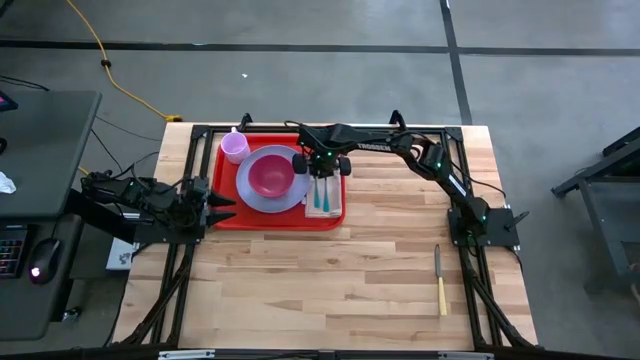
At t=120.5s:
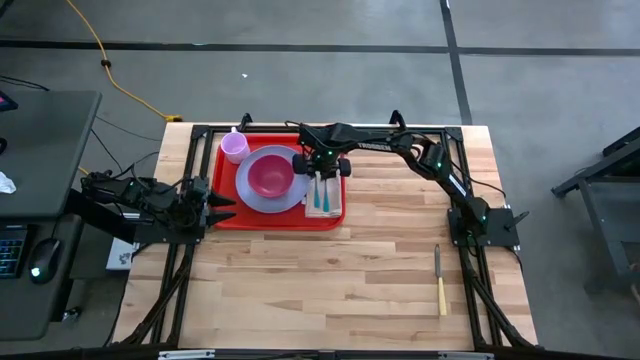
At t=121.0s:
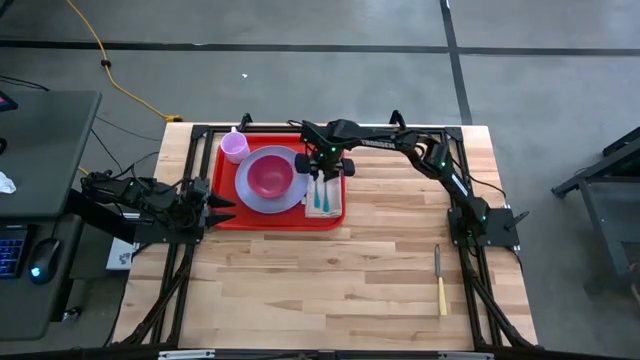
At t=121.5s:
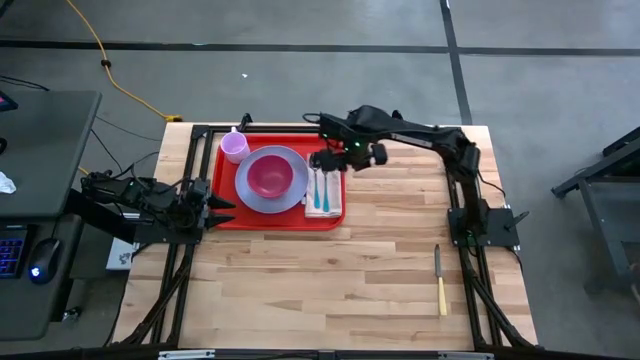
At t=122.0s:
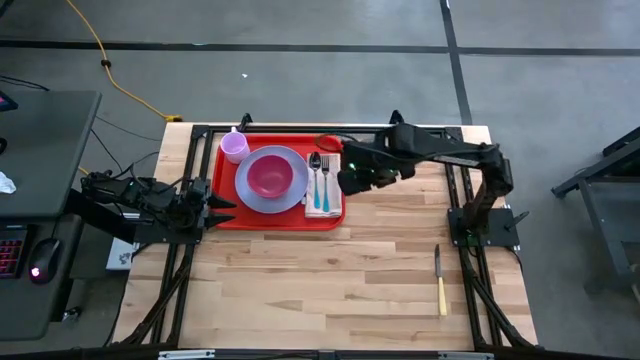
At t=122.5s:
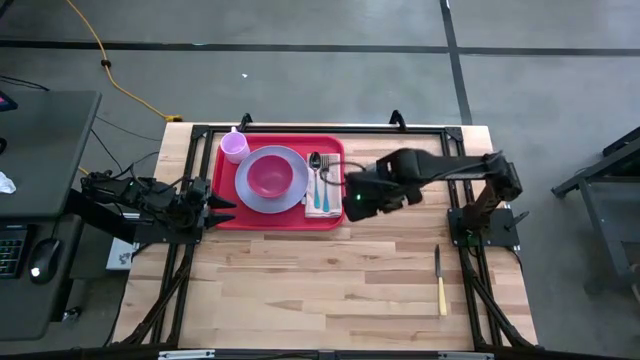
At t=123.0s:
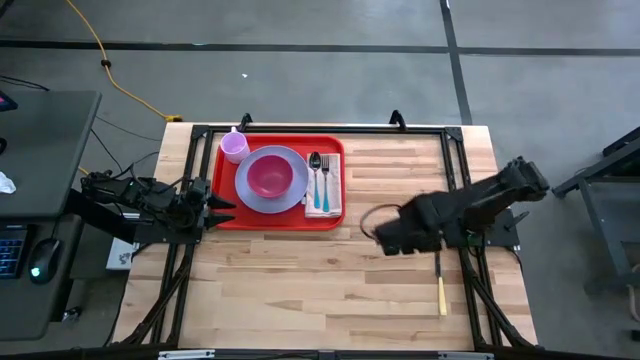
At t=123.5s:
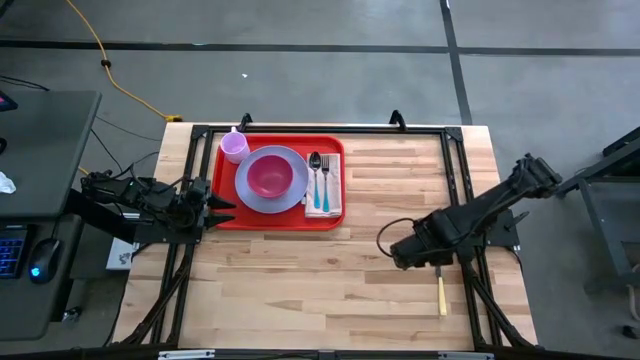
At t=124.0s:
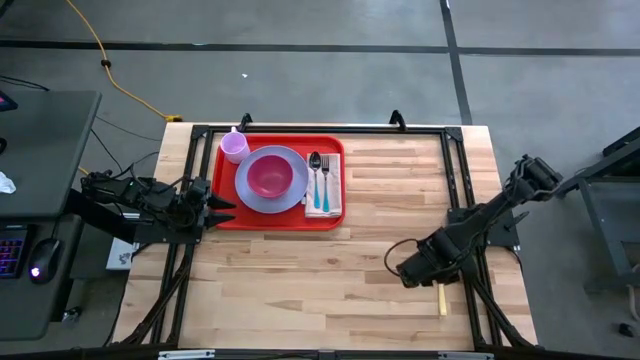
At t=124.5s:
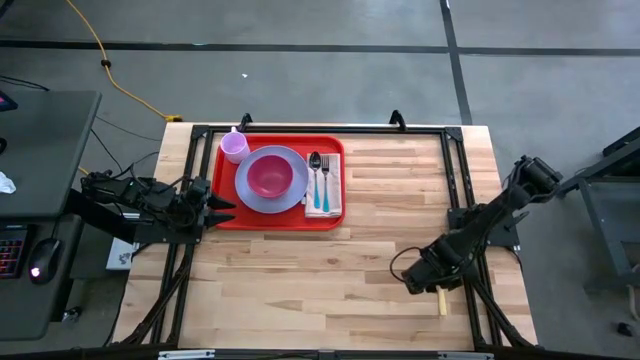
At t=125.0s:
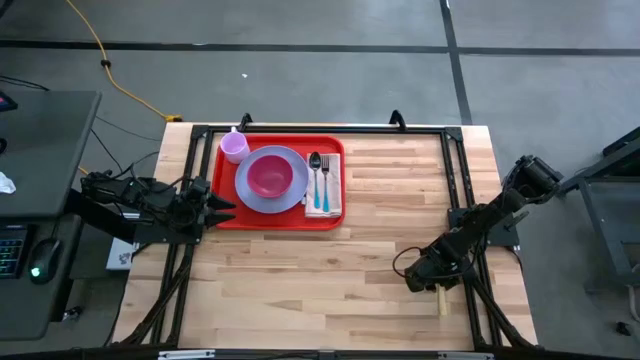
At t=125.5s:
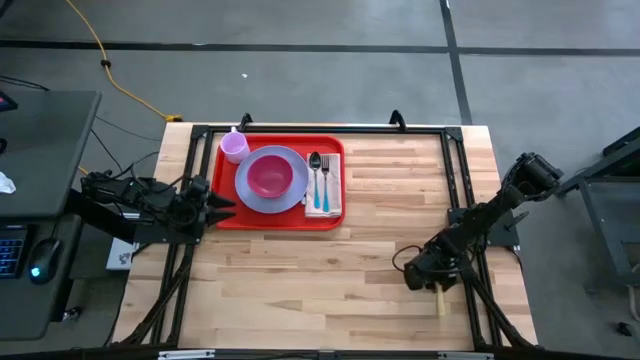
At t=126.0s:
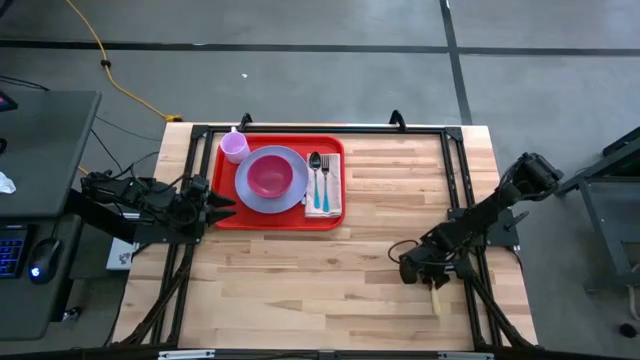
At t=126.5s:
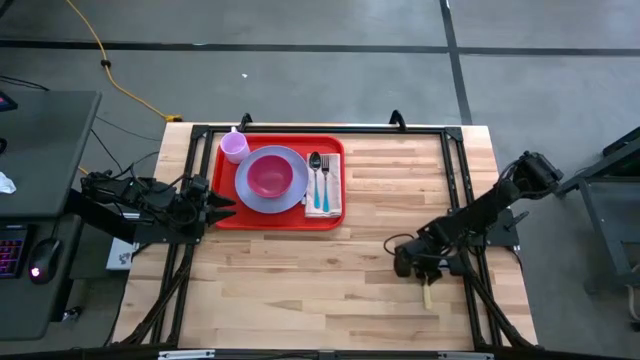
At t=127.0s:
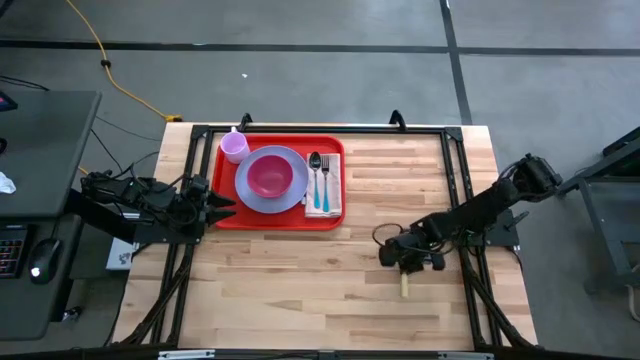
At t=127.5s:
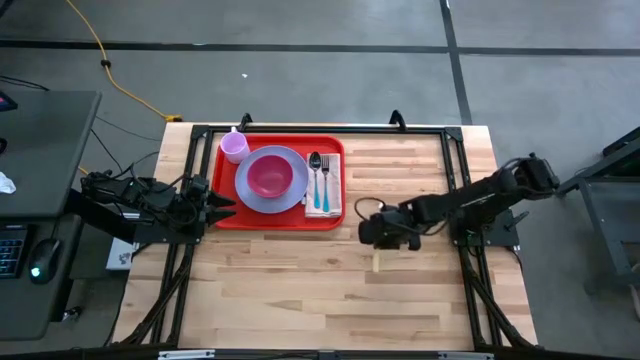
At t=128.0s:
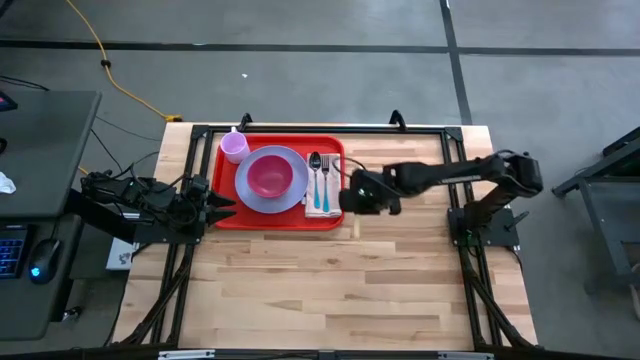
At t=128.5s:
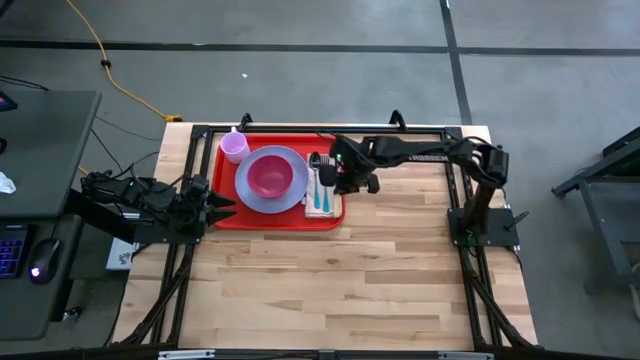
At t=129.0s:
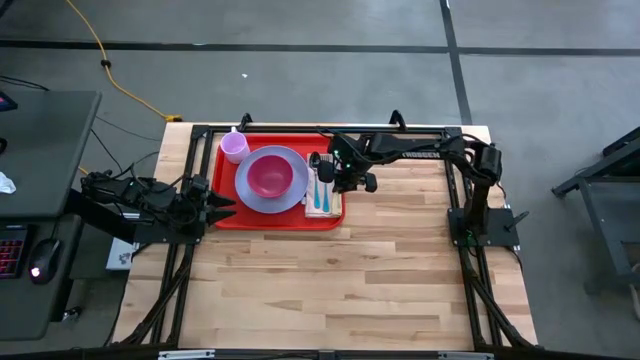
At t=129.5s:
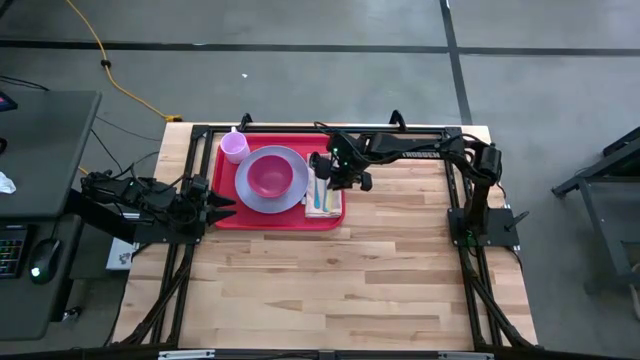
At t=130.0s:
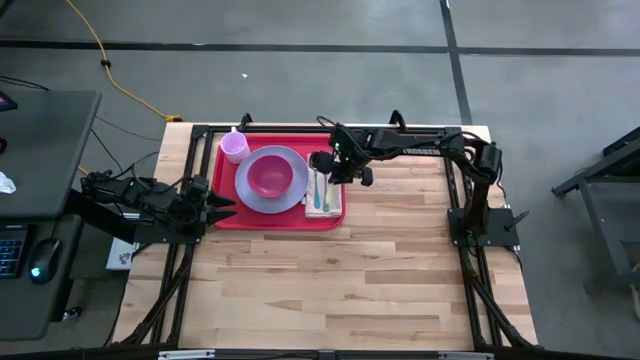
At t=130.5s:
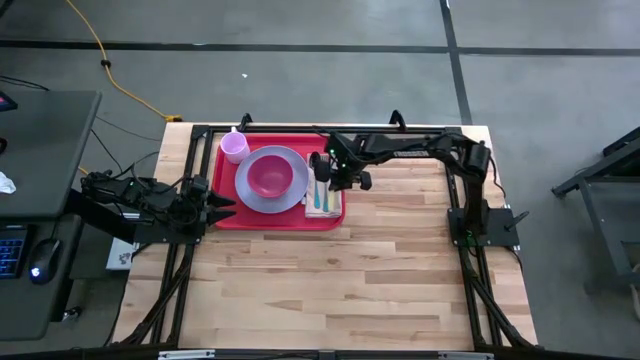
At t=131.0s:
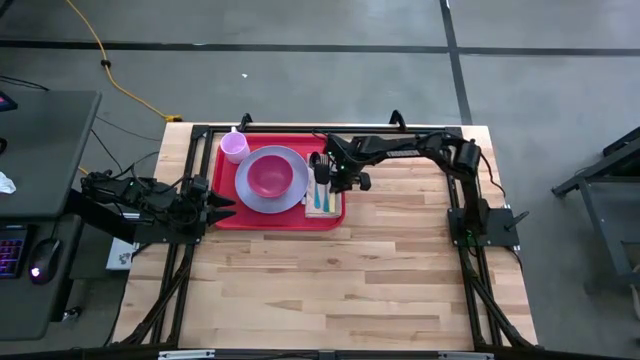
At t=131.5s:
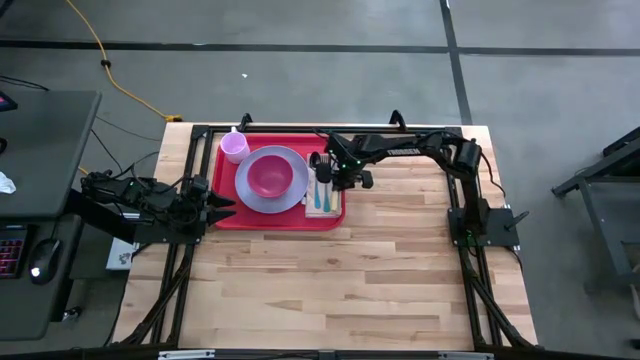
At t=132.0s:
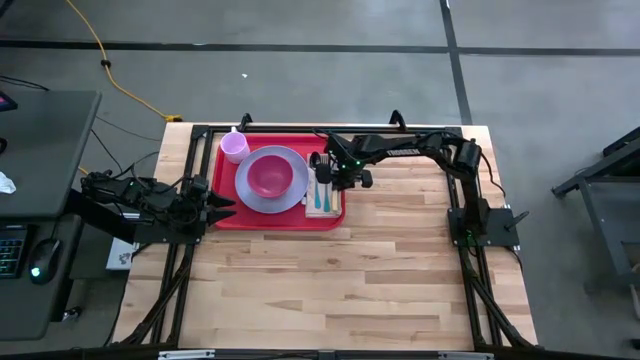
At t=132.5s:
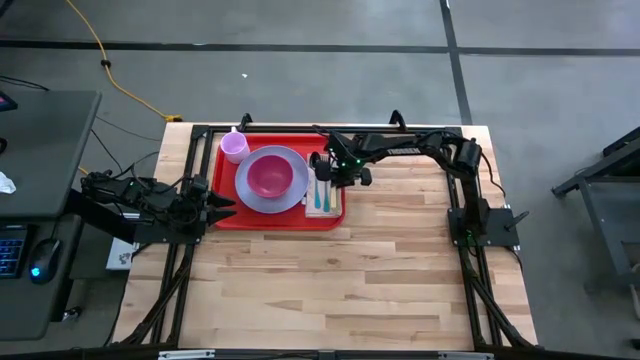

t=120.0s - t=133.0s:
Task: Set up tray
Put the yellow knife to the right of the blue fork on the brown napkin

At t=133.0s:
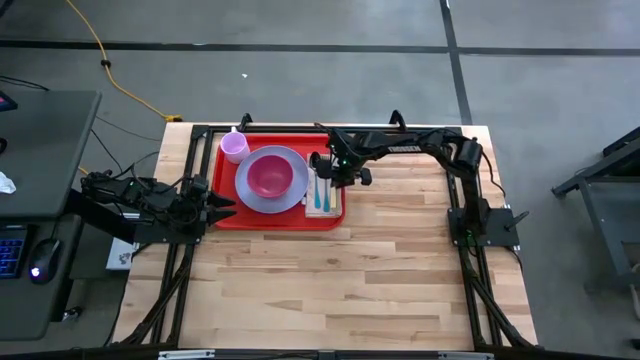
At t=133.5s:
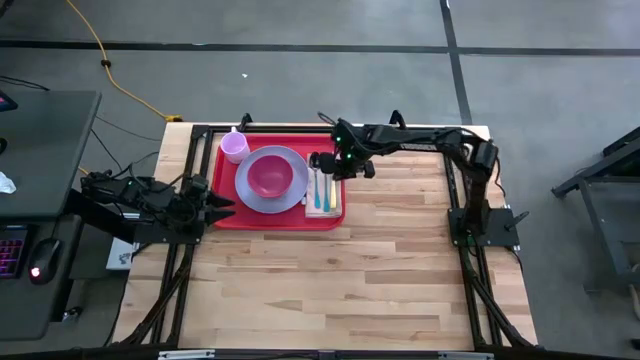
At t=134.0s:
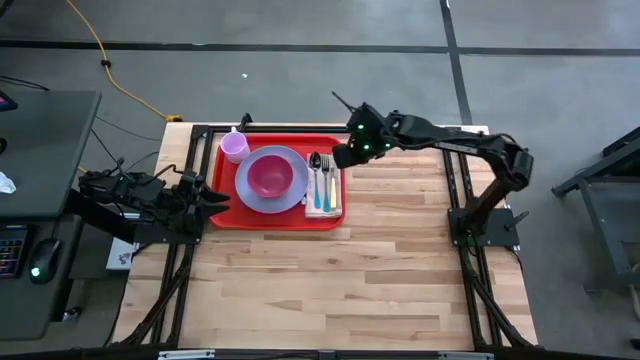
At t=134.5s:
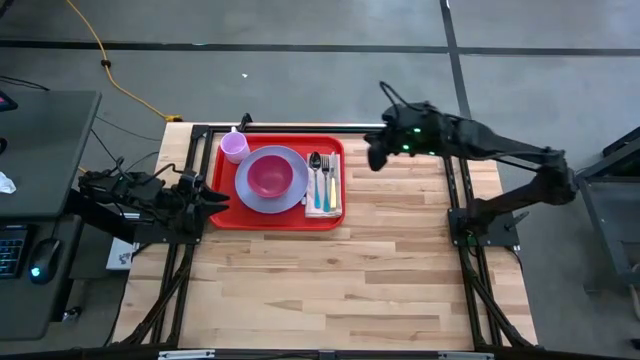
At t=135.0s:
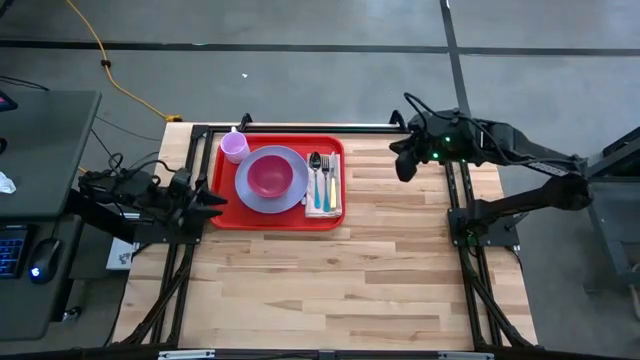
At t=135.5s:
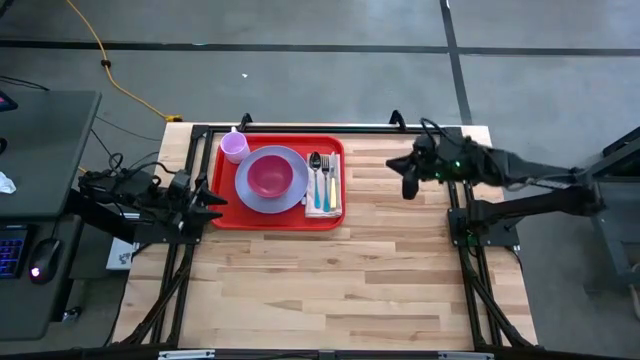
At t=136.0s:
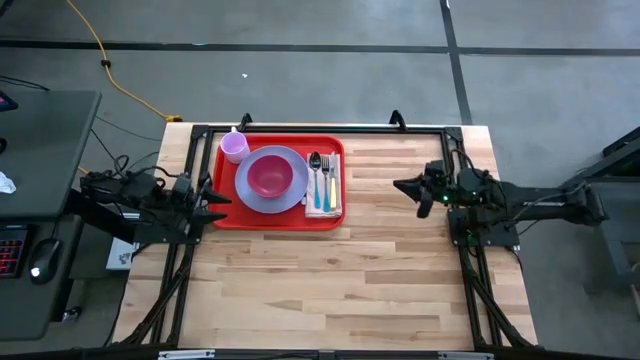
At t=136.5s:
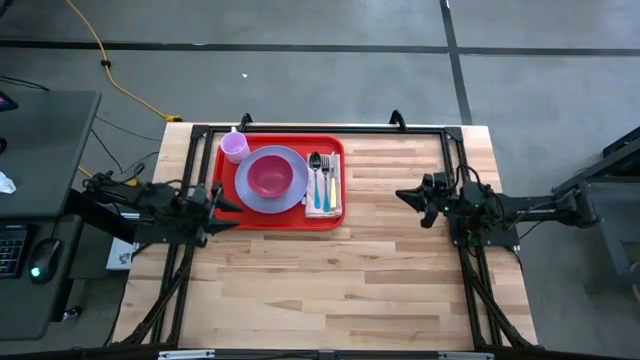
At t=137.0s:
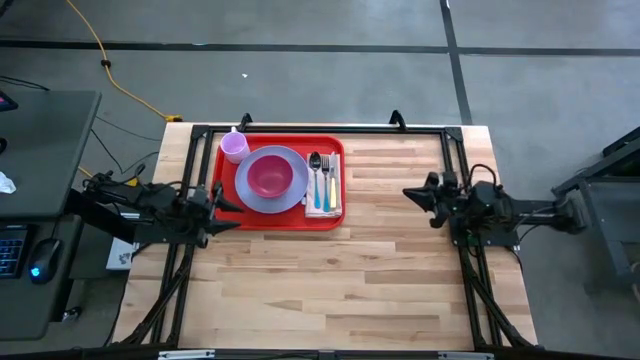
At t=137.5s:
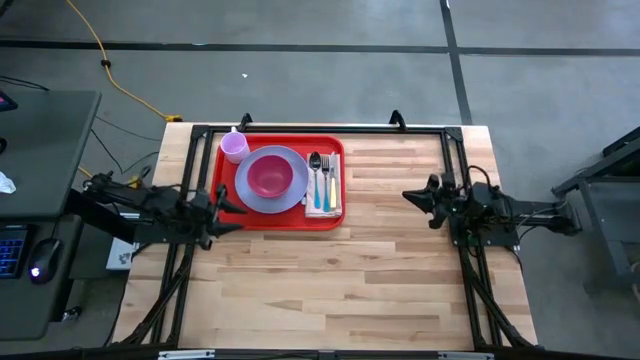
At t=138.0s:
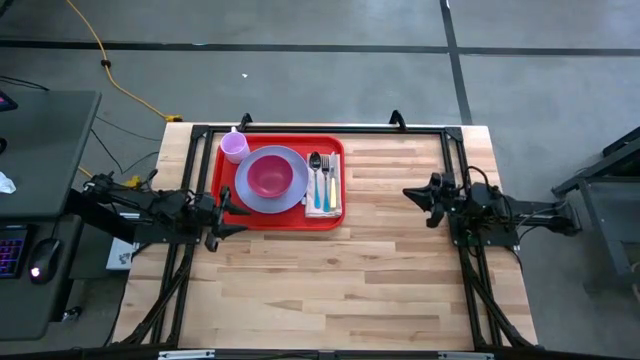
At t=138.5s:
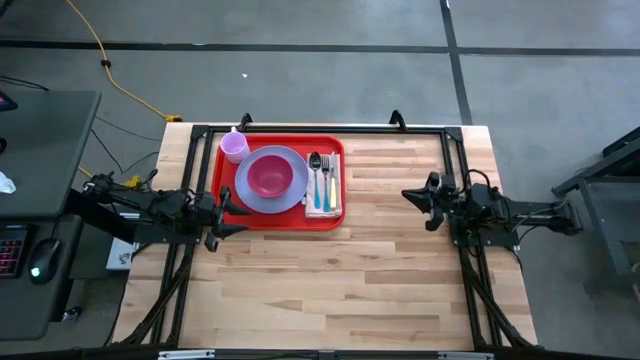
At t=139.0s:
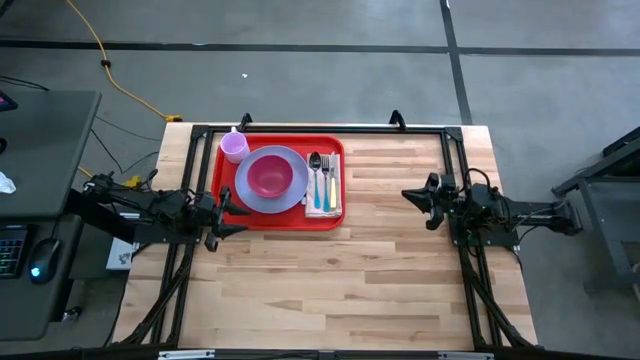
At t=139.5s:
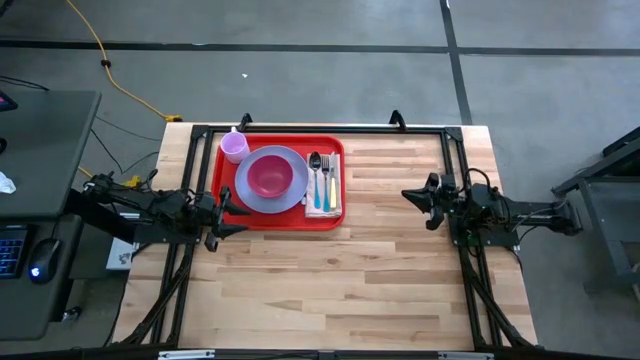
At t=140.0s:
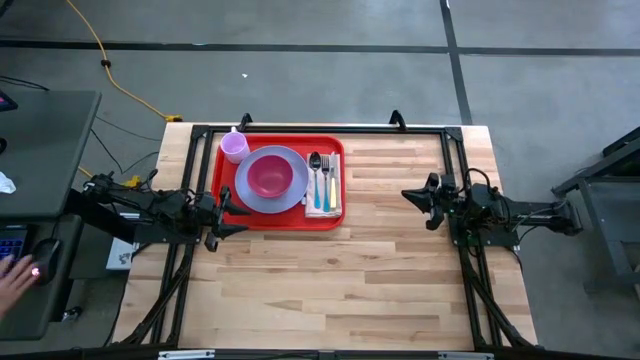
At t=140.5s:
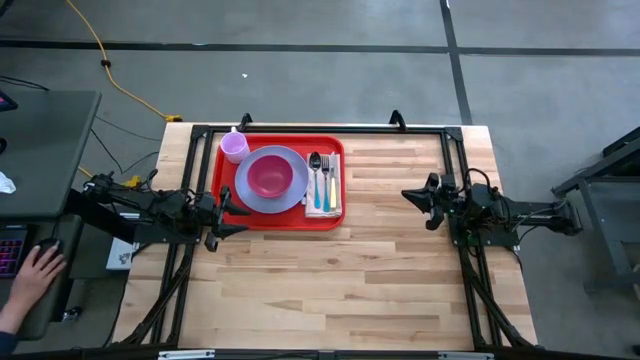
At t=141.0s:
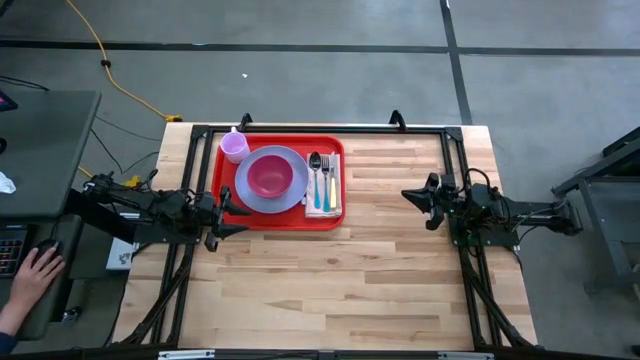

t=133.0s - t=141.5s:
Return to Home Position
